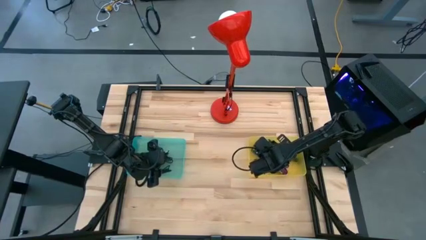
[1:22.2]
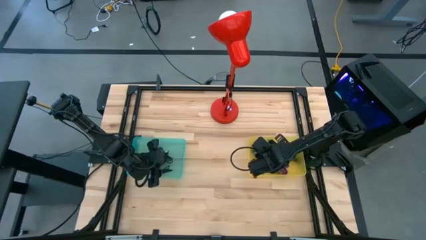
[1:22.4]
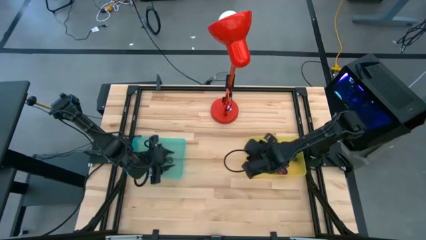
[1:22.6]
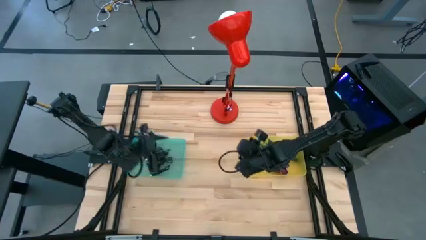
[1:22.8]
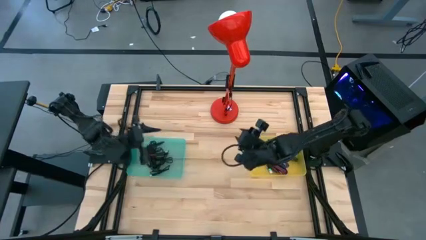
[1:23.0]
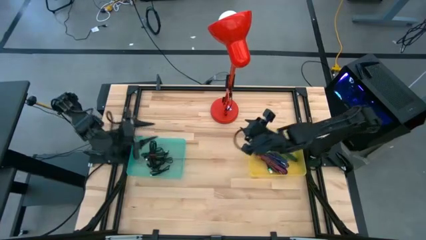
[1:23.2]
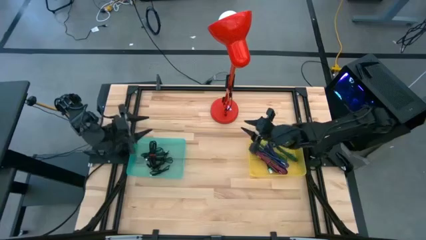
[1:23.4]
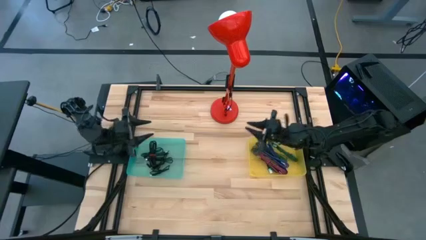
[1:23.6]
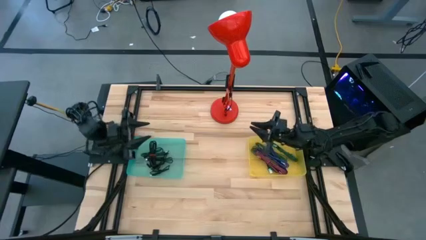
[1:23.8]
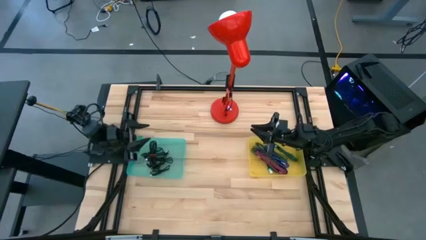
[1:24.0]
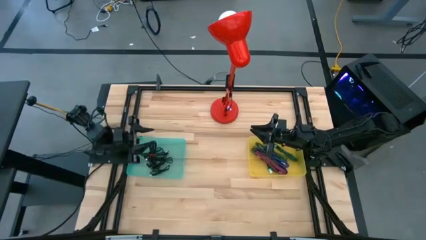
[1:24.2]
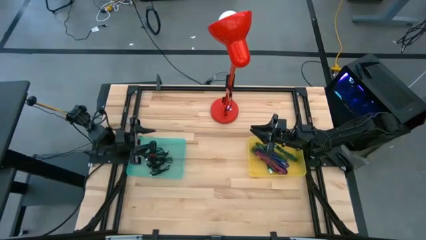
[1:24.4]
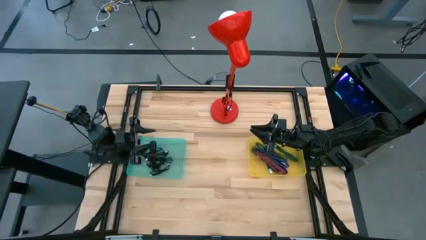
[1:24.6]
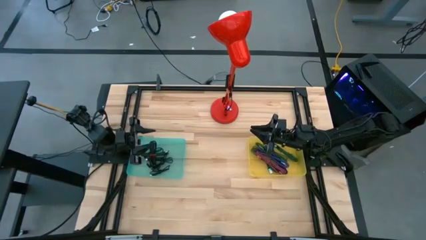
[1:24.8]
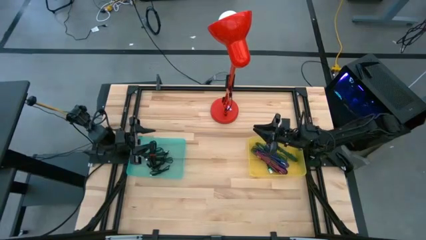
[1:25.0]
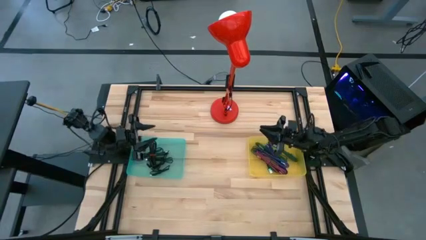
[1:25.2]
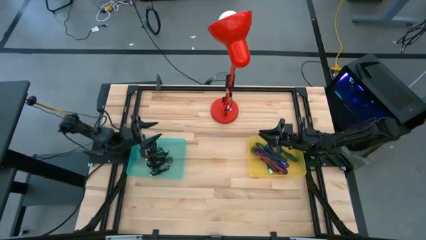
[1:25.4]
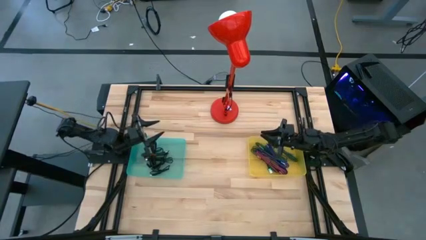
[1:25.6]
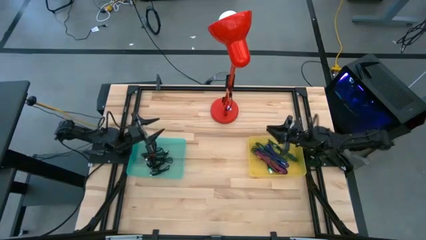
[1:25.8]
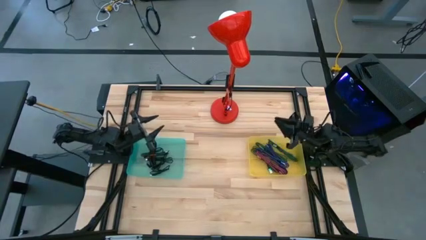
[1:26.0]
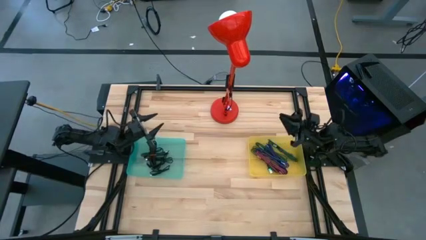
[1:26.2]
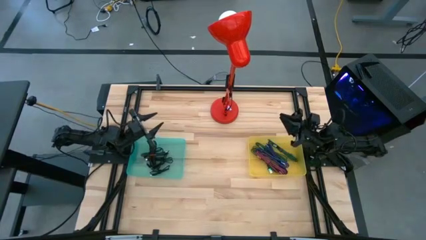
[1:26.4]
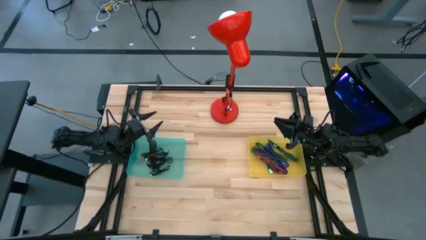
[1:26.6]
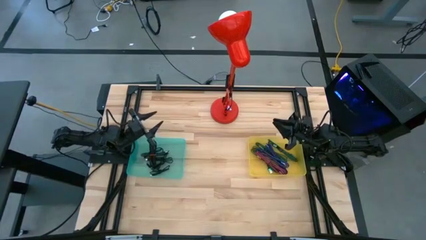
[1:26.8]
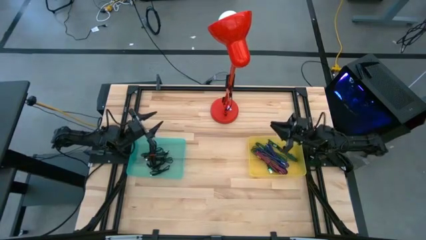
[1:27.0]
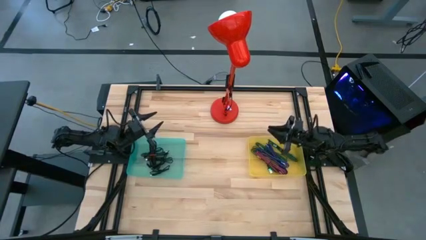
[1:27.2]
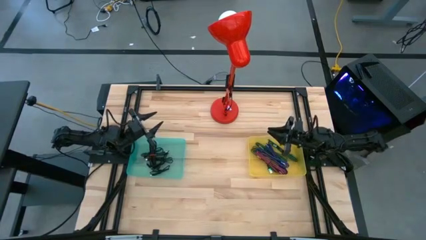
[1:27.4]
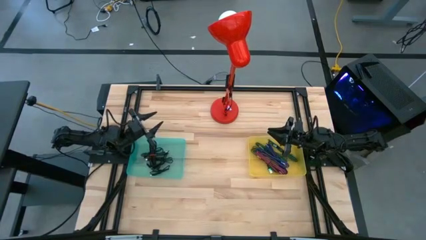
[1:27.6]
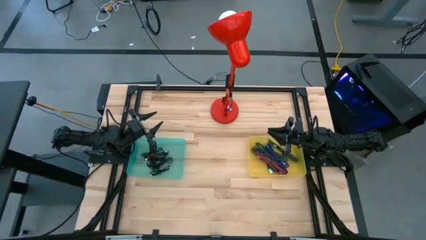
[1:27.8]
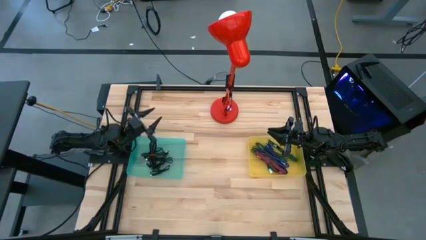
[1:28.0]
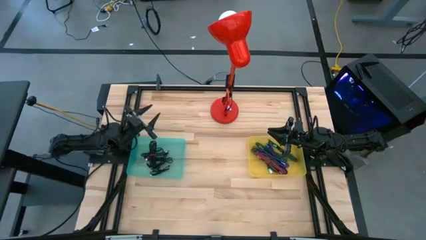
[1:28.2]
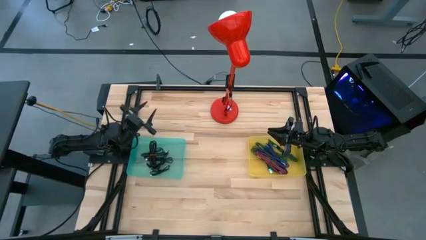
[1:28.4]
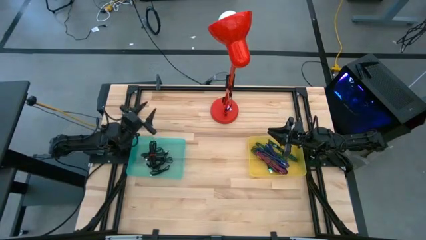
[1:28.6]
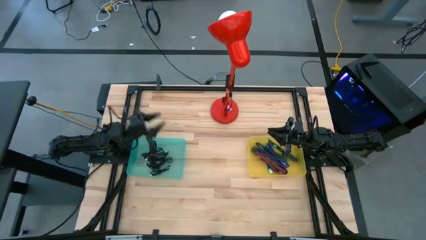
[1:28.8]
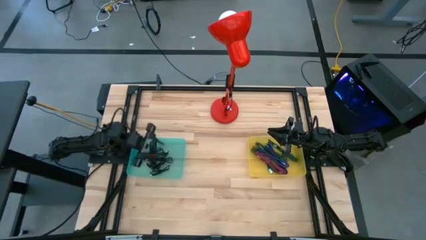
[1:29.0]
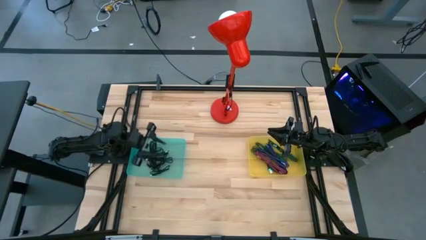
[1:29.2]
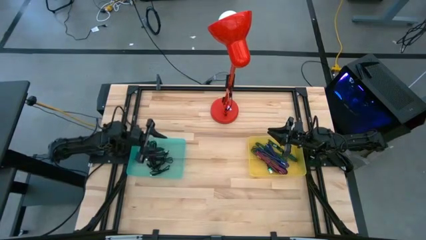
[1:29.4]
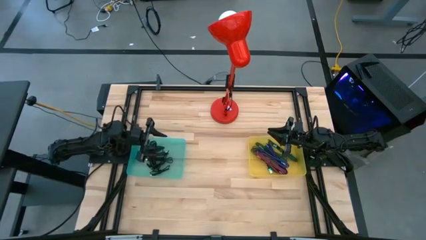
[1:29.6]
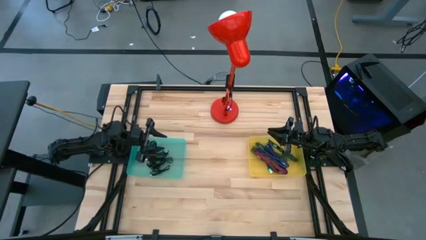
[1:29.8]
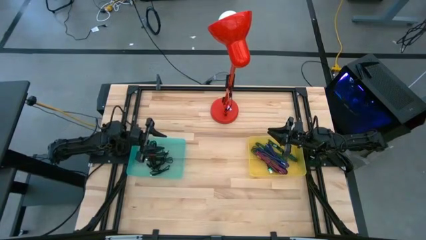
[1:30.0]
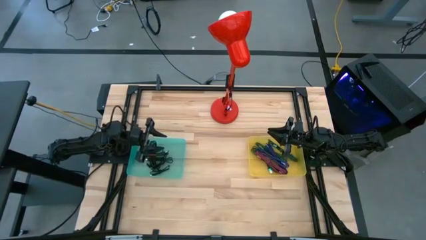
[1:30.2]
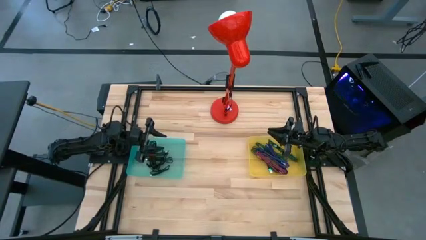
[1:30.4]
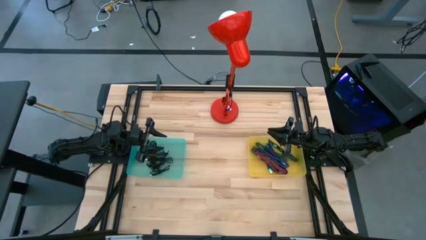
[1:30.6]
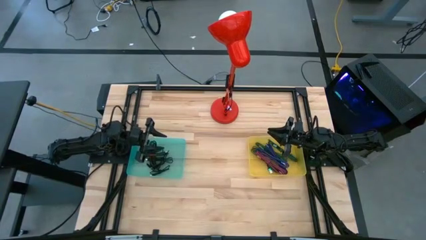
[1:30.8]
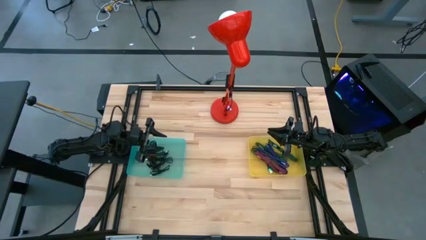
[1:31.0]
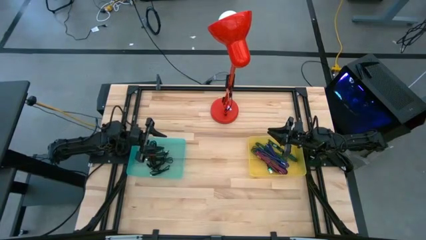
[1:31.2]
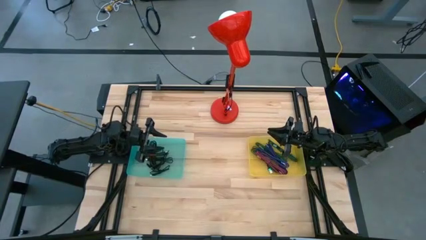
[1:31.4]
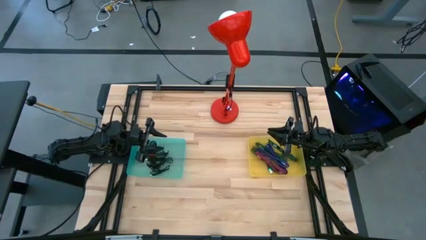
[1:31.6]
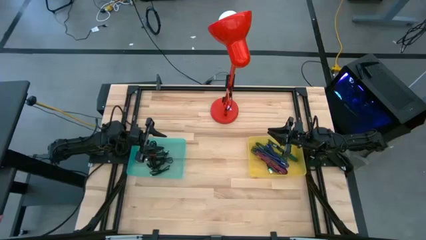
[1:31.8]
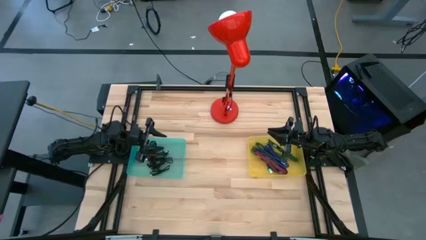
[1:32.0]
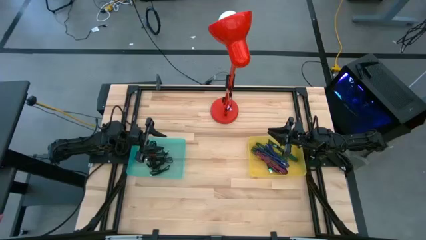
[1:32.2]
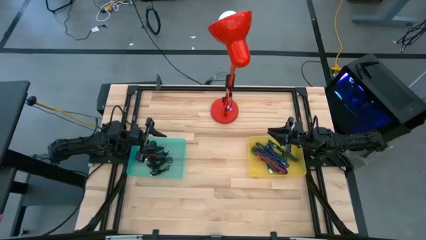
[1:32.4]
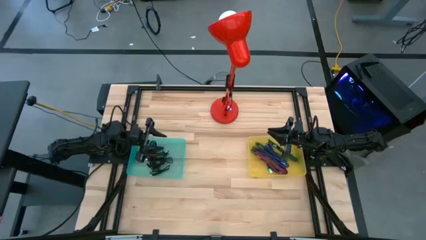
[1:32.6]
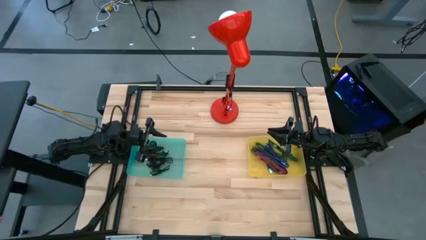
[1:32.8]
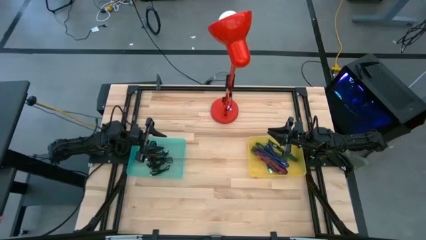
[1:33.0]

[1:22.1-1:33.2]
Task: Pick & Place USB Port
Return to Home Position

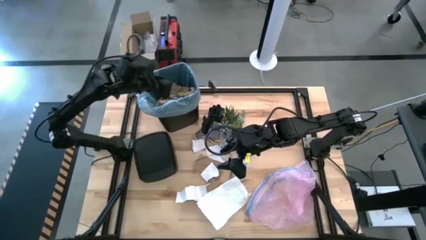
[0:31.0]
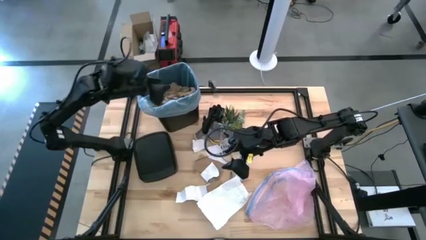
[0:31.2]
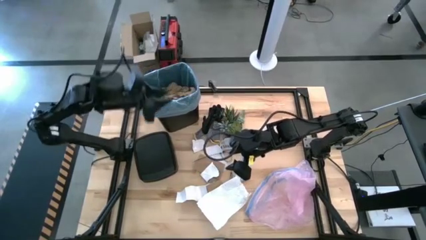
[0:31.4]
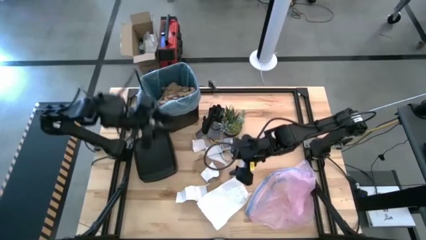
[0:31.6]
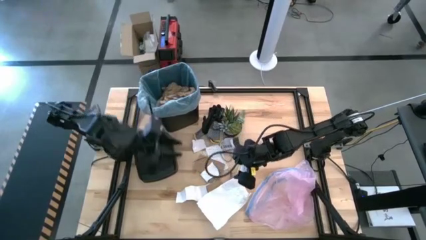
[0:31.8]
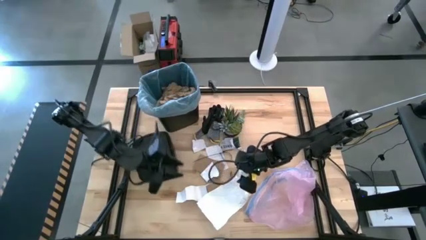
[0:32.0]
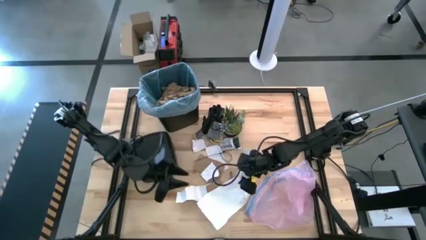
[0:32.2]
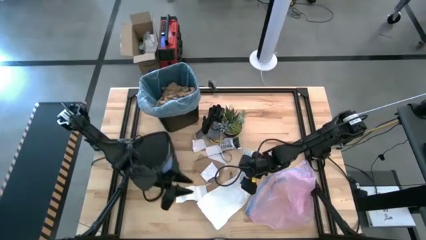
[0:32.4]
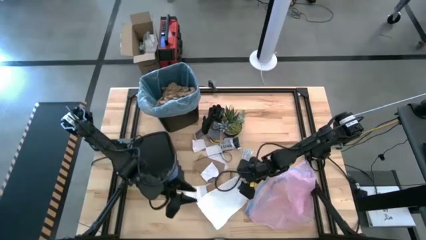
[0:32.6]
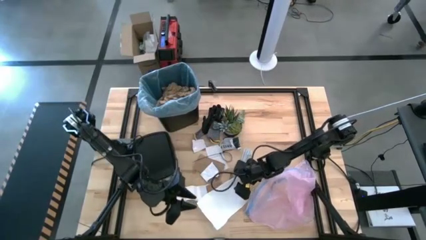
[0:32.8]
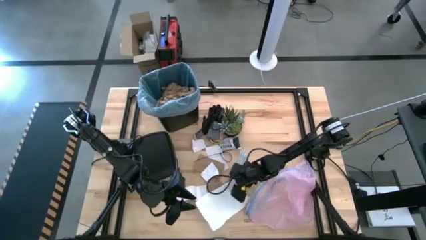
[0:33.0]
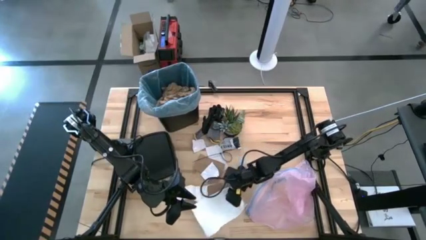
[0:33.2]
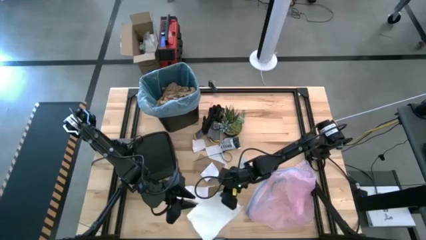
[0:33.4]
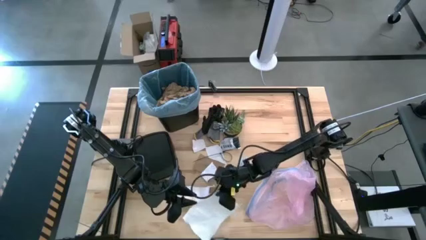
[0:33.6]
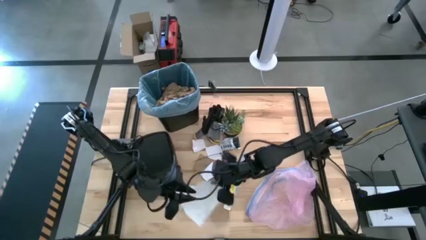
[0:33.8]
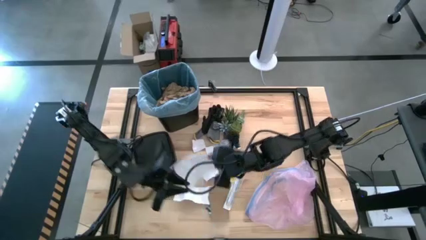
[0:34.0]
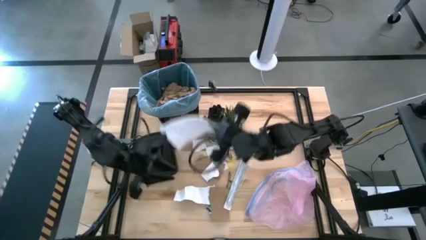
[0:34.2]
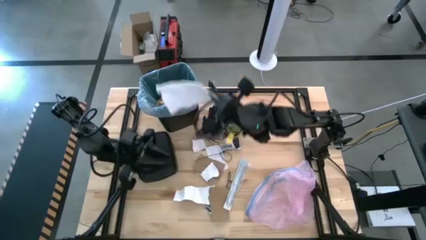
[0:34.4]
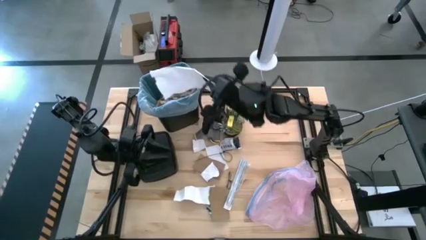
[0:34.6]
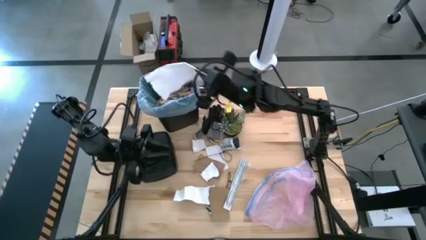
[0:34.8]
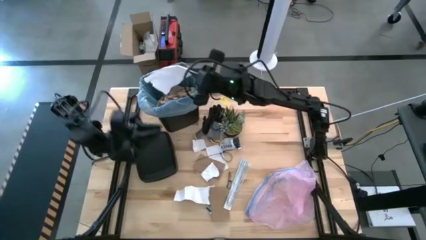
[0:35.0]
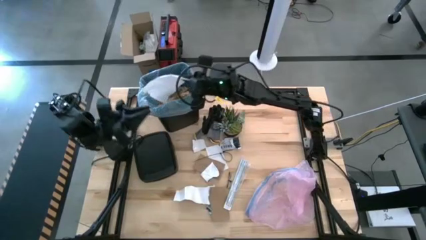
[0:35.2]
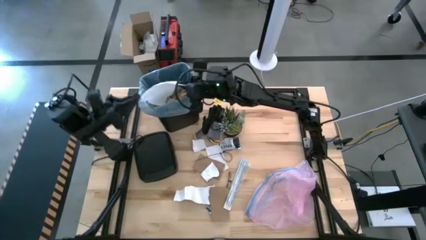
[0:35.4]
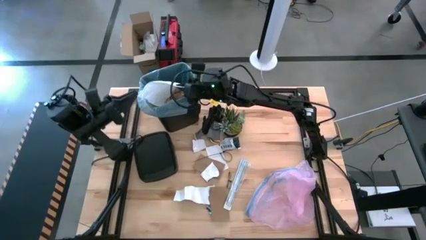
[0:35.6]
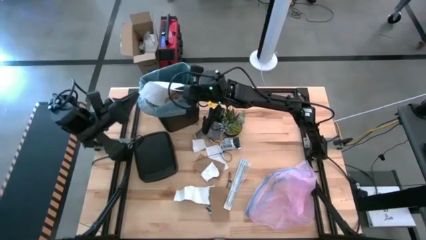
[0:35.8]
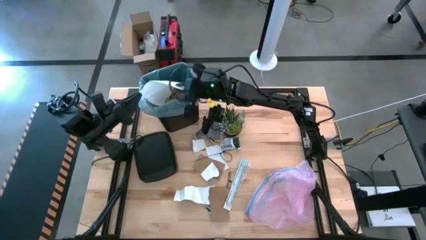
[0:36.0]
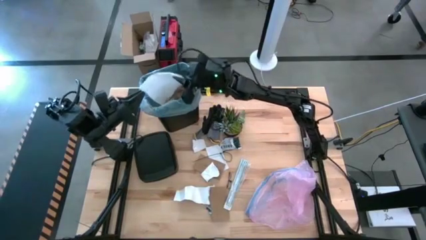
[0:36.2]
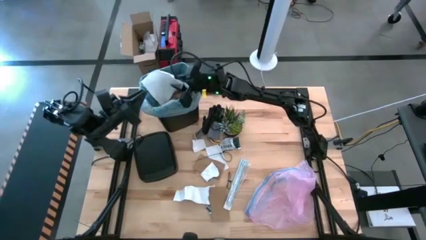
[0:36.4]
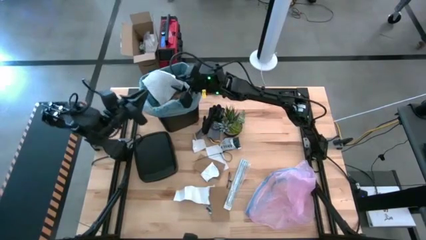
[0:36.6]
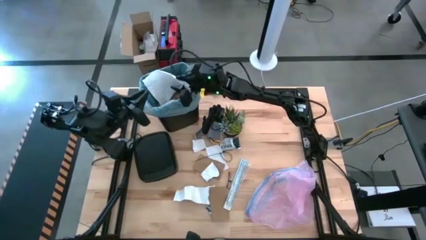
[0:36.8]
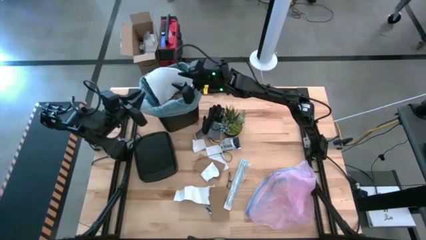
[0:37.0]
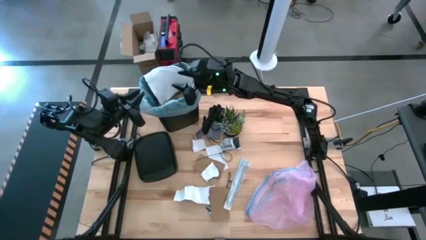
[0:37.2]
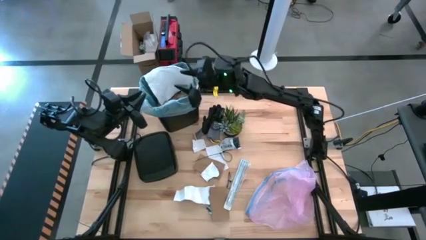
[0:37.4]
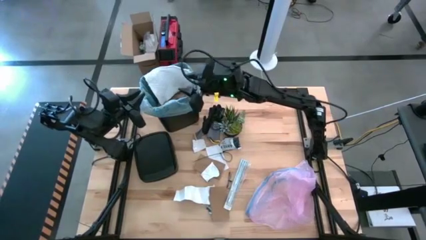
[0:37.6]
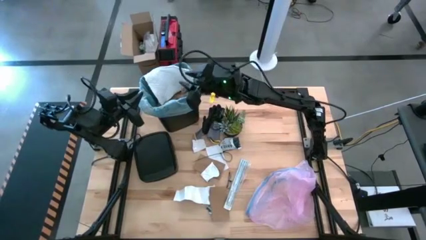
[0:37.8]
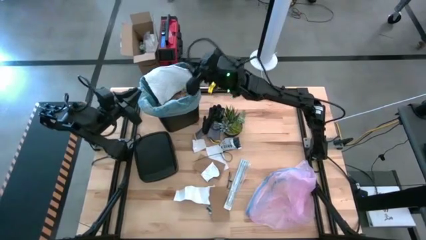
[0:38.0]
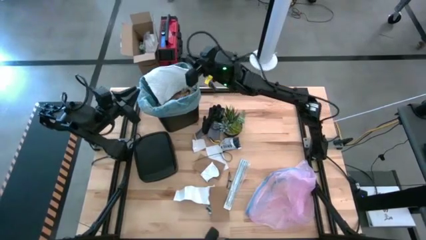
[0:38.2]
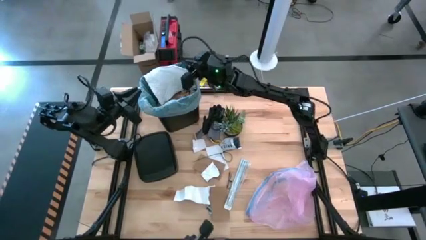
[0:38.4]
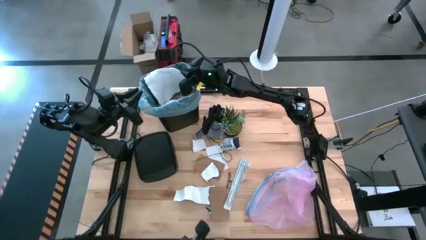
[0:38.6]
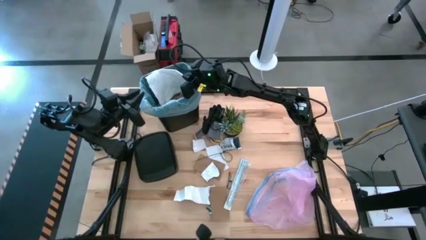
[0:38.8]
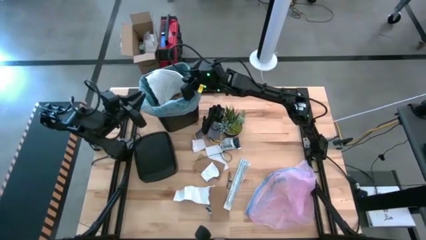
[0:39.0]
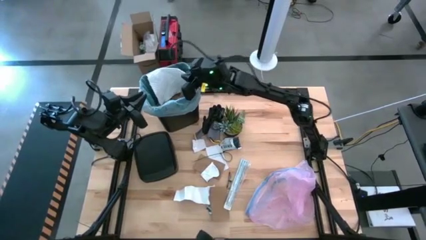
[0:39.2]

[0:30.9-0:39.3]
Task: place trash/remove bag and relplace
Put the white paper into the trash bin
